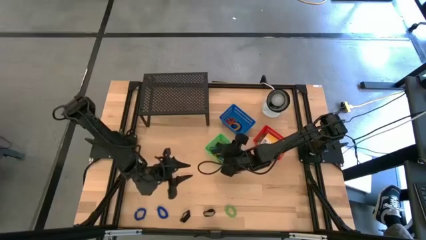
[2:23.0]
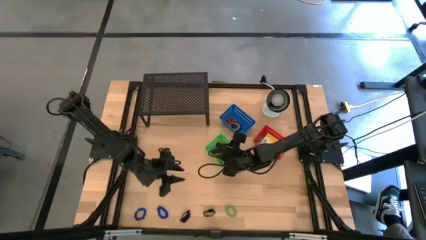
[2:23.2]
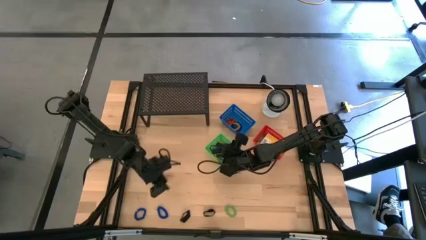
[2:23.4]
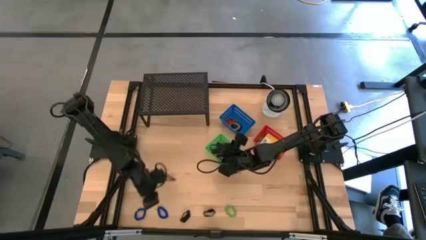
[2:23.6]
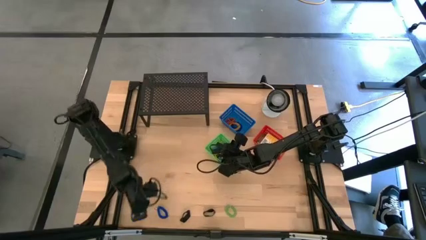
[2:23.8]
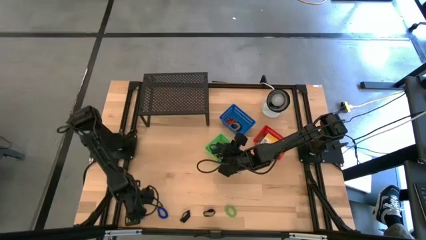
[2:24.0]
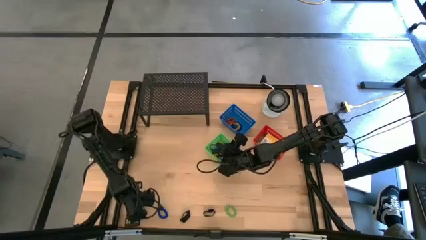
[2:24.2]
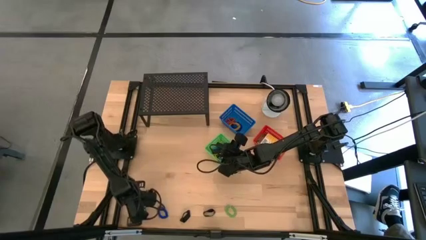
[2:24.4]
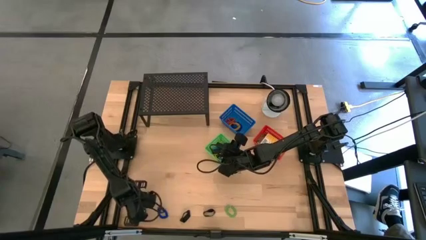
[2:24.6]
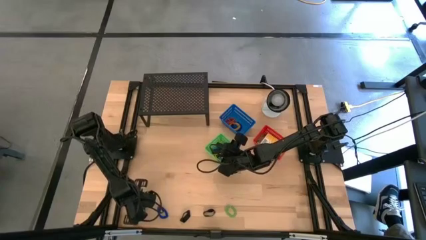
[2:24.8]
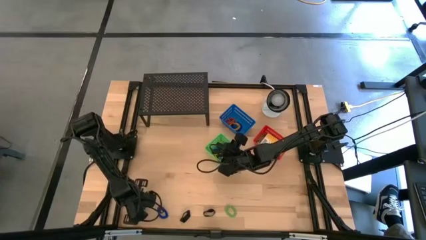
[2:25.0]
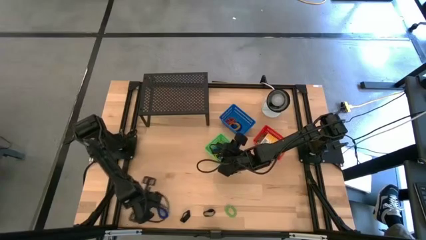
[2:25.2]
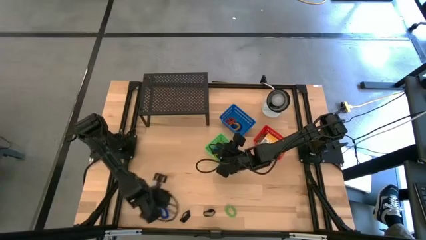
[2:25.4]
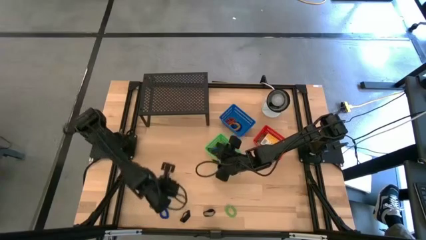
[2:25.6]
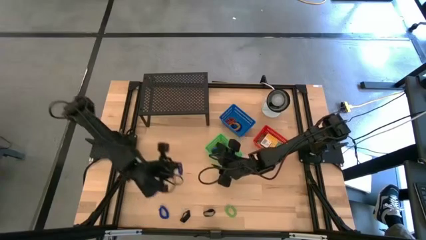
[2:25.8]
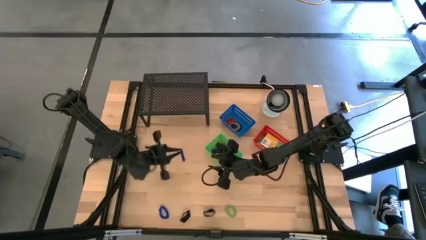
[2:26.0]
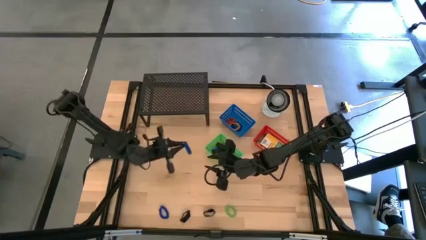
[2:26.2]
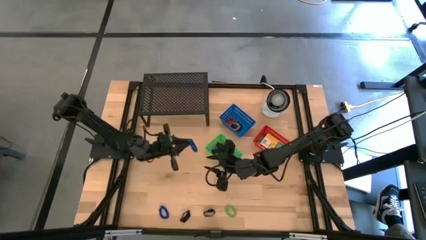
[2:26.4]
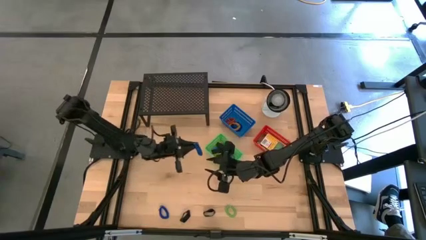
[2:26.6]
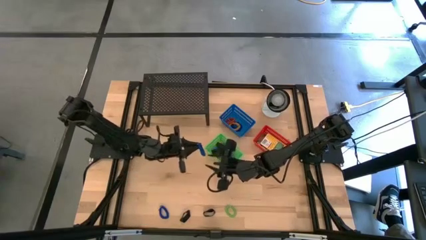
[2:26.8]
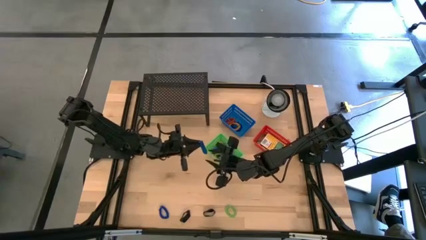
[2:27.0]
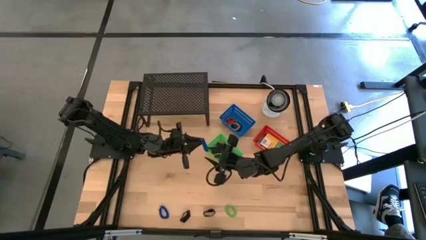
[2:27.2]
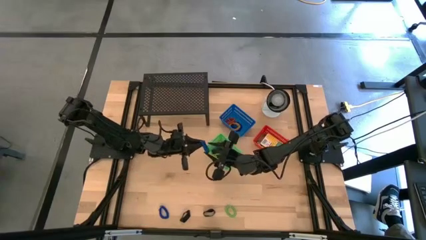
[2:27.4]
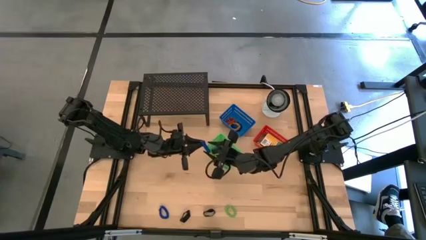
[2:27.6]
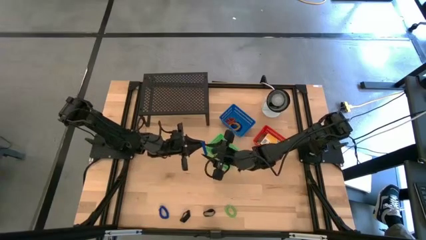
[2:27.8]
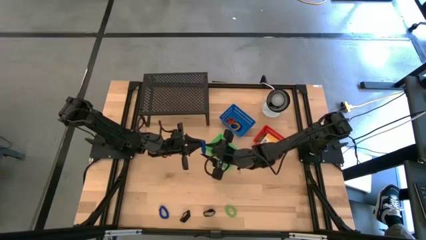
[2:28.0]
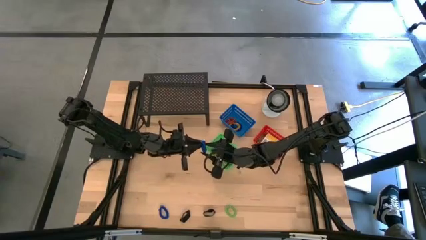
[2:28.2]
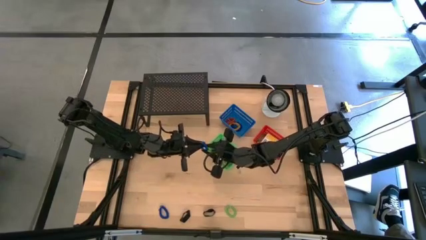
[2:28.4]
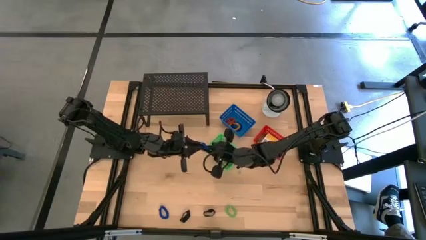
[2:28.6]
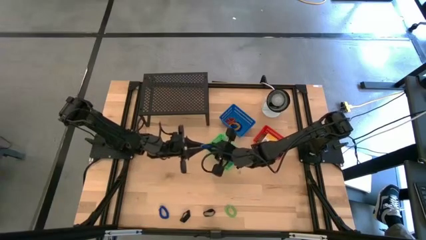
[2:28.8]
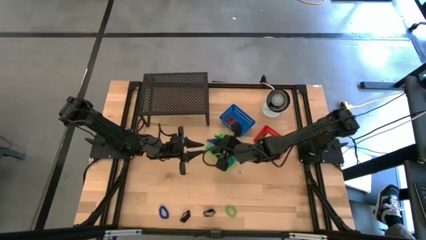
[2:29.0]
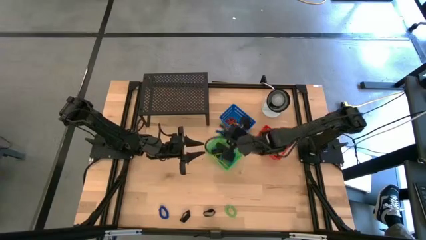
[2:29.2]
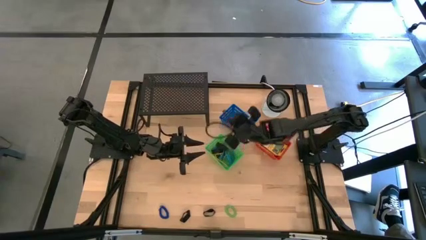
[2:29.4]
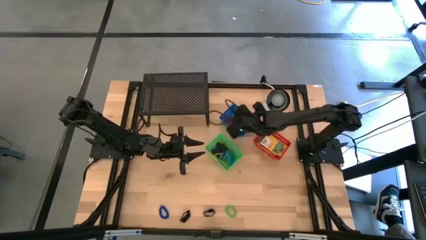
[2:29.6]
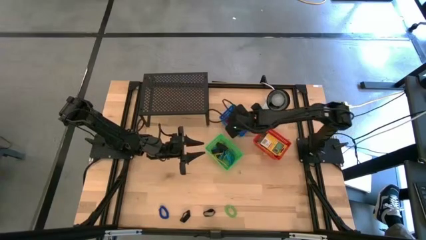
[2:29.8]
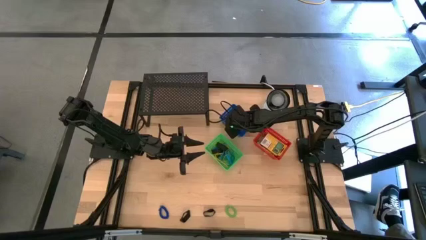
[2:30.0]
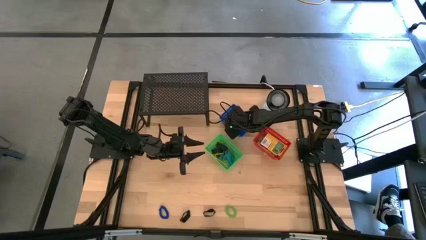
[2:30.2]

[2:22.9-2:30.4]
Task: Pick & Place Office Desk Supplies
Put the blue spring keychain into the blue basket

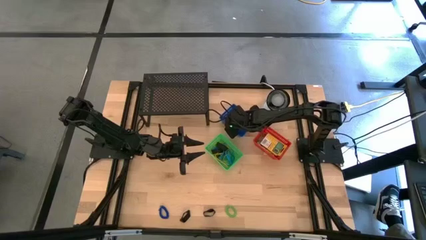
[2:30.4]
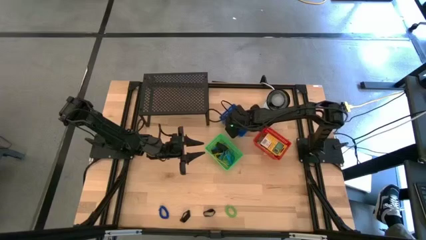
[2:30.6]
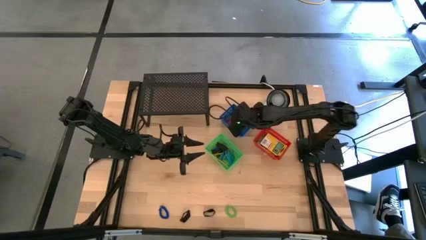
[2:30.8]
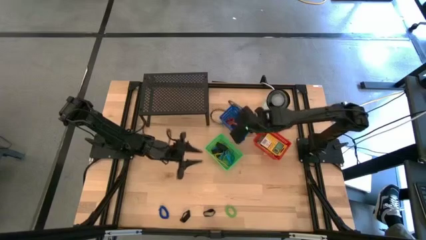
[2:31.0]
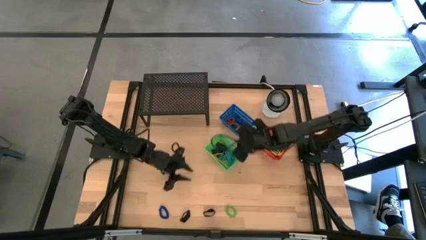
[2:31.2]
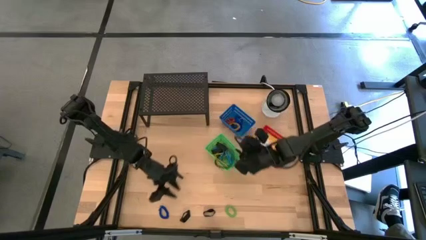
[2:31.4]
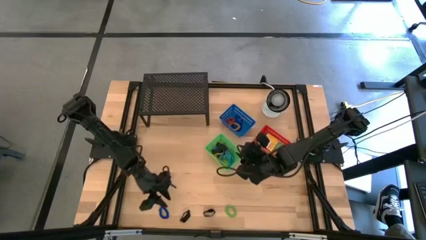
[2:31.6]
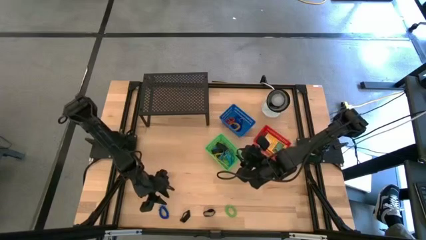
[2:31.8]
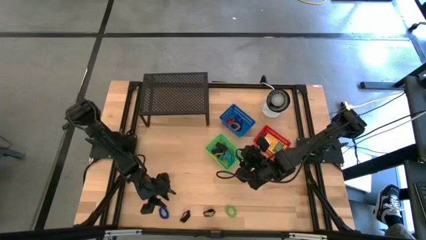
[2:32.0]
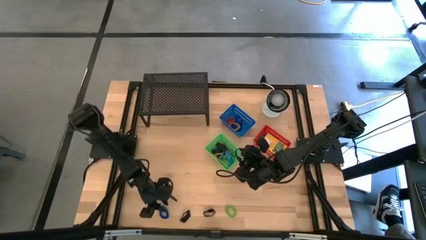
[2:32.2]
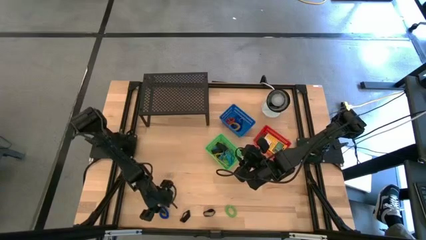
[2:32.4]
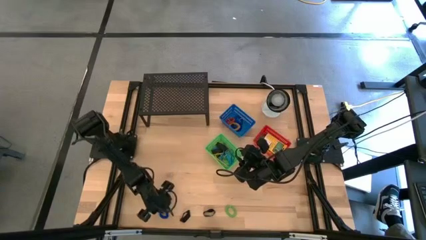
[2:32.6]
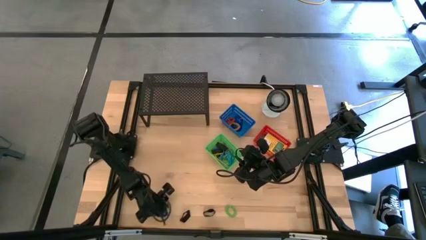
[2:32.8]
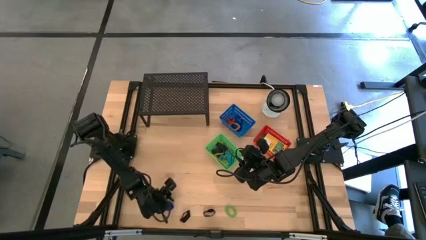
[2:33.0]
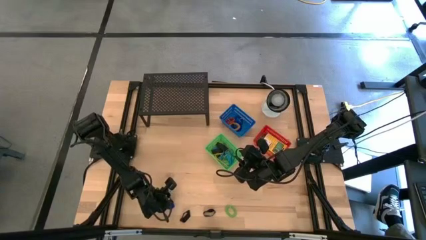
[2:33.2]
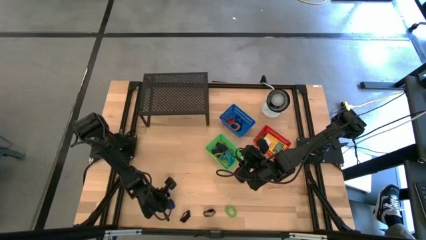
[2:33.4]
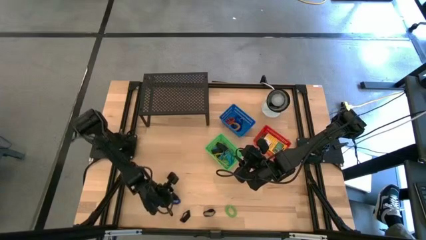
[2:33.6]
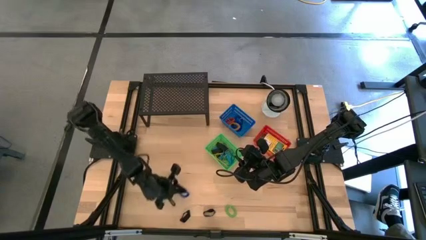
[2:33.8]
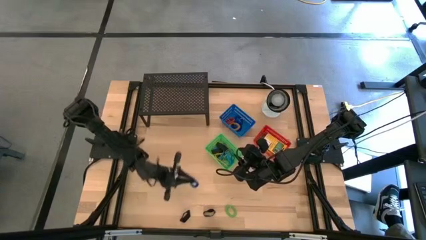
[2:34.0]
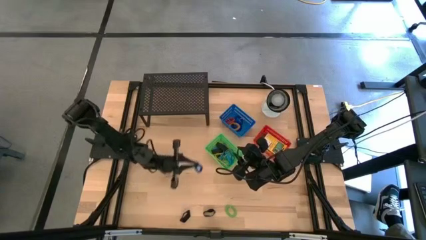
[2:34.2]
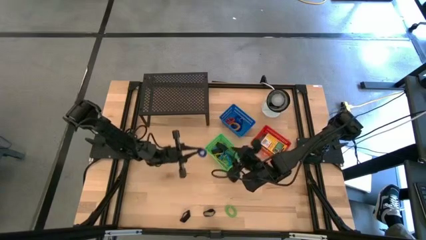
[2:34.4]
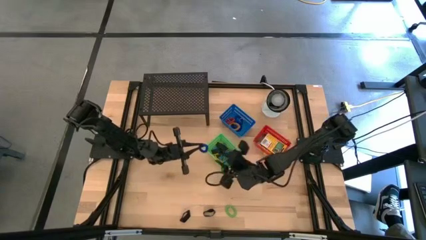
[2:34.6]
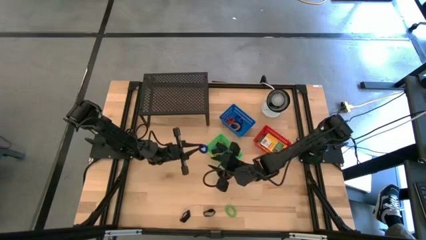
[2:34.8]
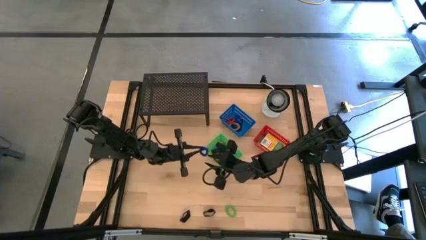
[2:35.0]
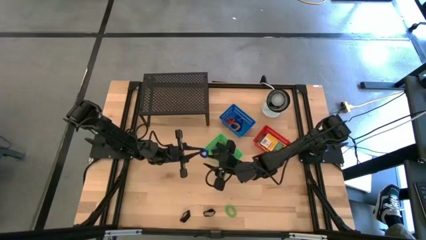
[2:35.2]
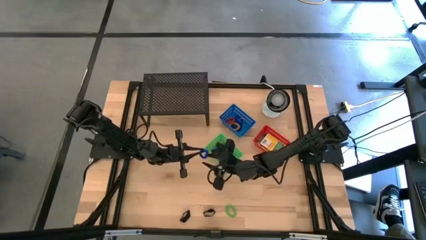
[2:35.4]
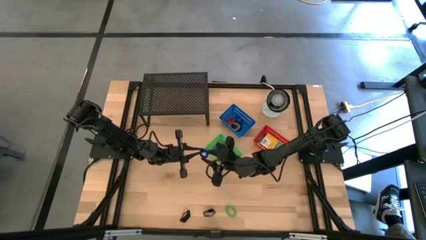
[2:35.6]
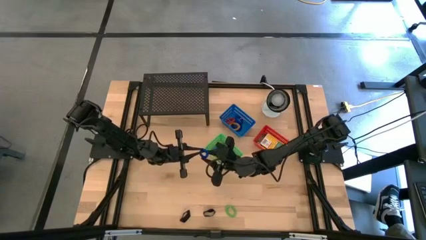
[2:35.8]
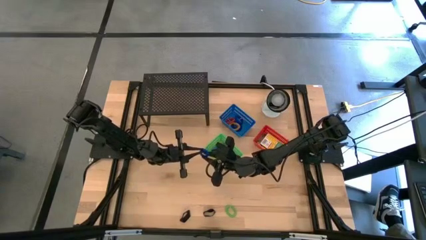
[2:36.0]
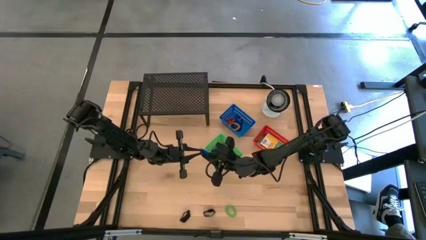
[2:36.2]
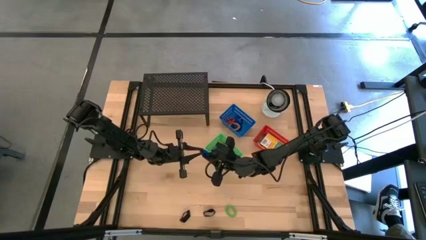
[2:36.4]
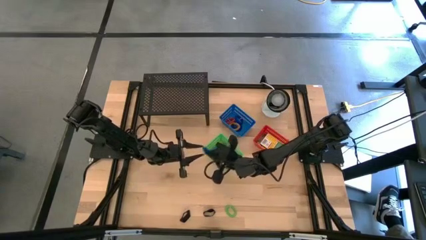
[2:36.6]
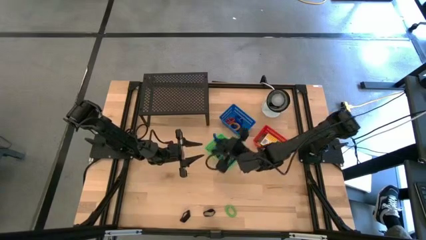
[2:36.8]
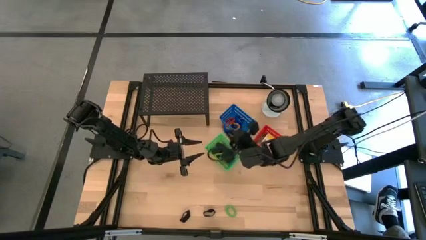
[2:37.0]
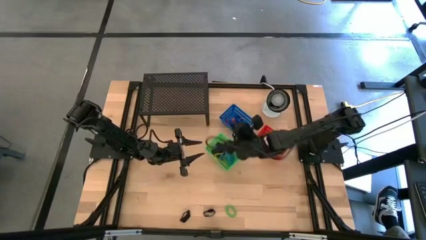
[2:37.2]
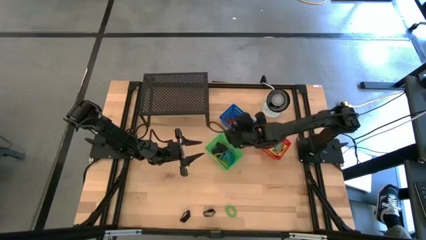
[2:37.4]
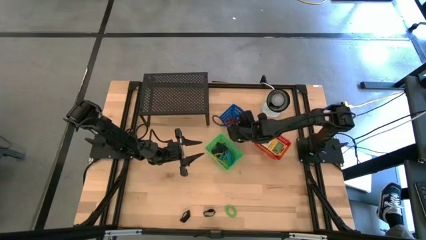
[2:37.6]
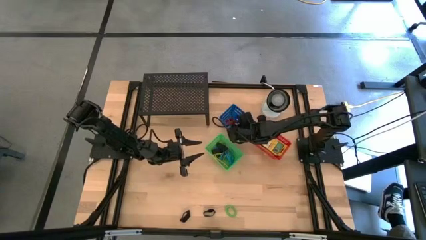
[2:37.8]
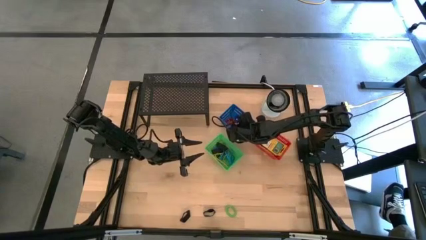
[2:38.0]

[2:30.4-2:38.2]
Put the blue spring keychain into the blue basket

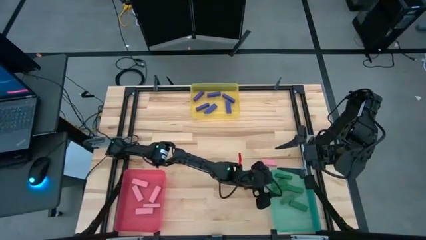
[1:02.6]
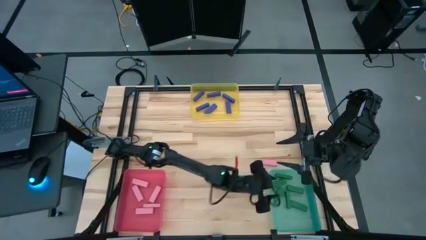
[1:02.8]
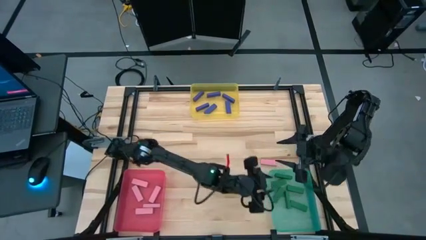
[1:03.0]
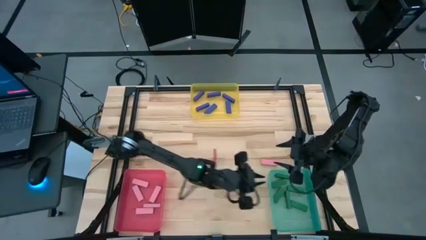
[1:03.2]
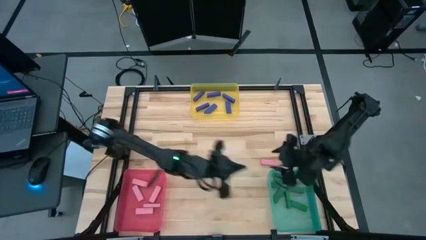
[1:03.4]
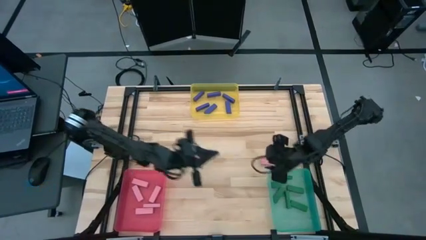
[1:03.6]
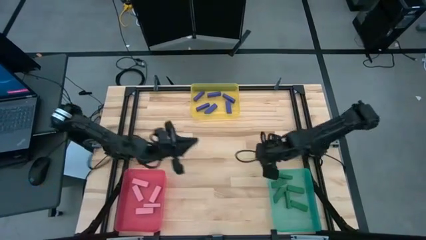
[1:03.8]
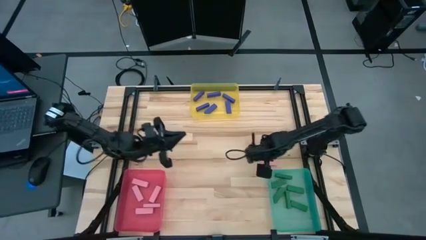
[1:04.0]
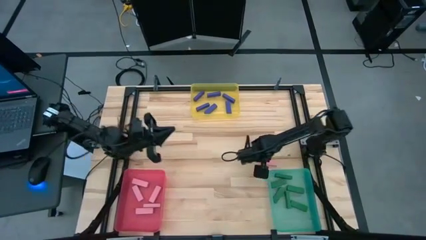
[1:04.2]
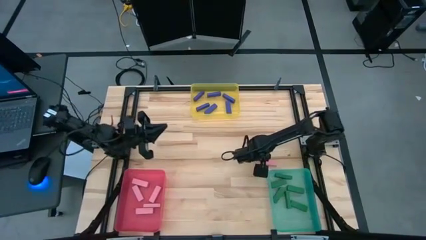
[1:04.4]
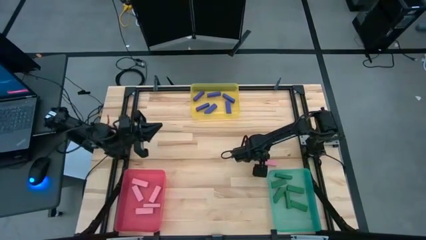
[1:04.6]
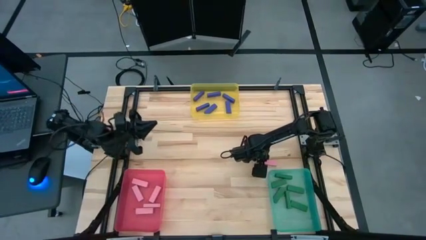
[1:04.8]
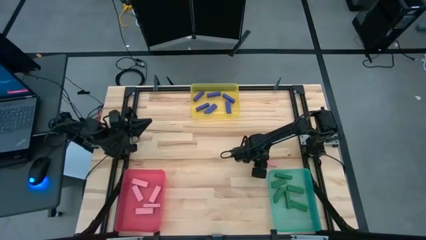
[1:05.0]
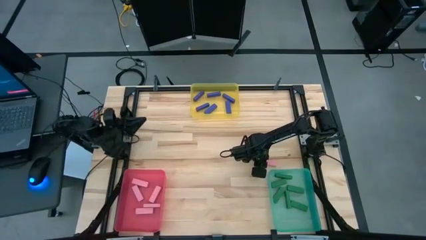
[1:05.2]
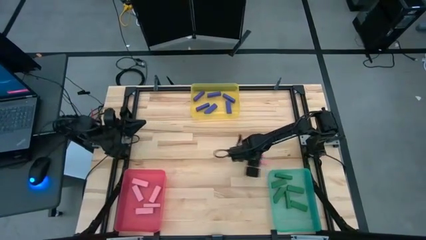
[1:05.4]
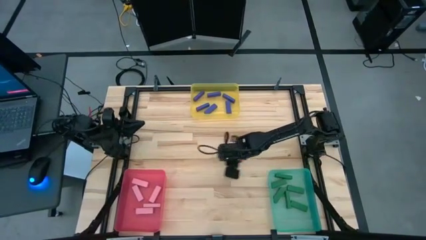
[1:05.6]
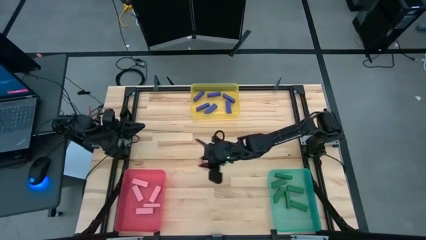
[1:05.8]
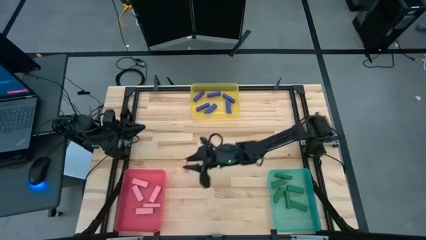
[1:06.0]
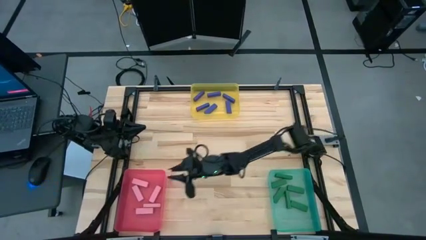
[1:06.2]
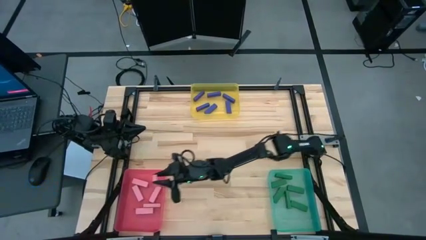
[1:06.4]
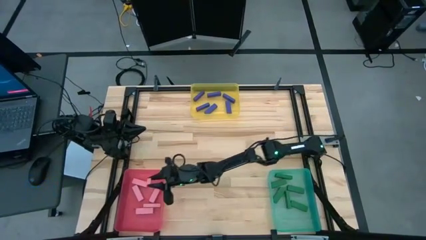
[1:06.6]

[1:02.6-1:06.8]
Task: Sort blocks
Put the pink block into the red bin
